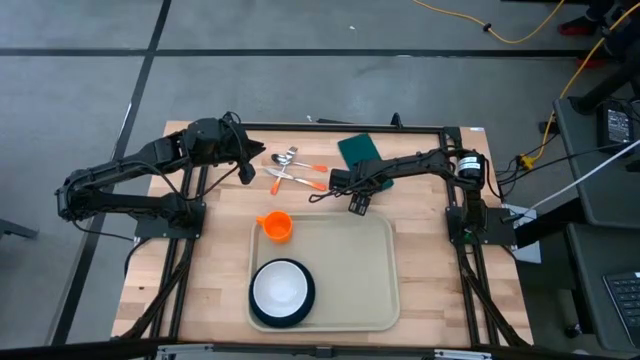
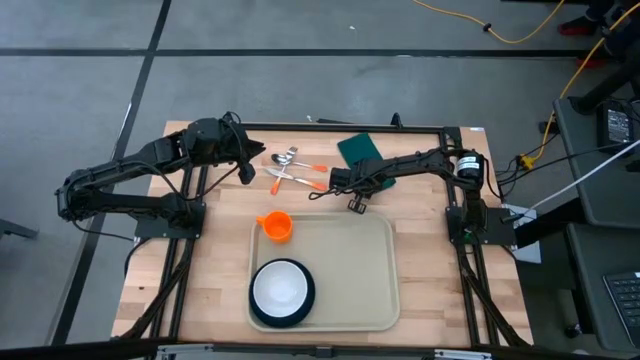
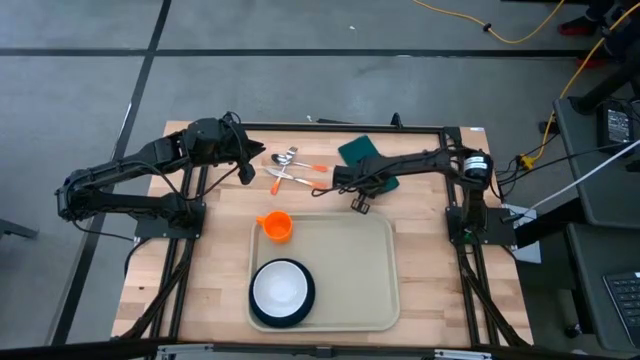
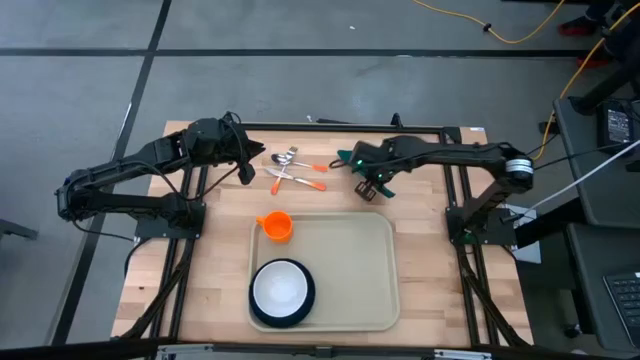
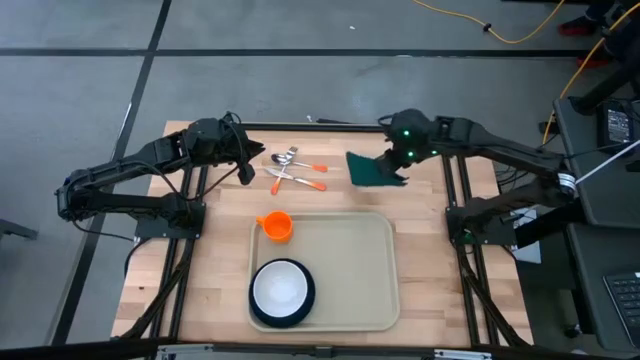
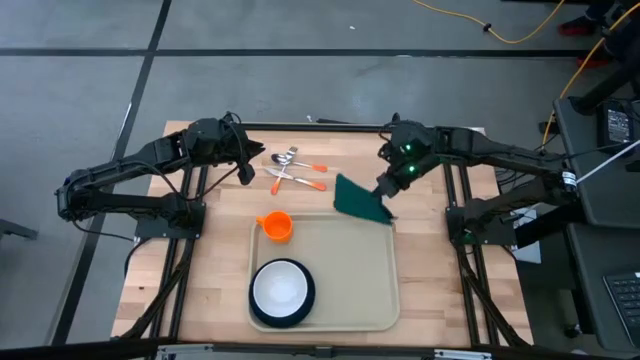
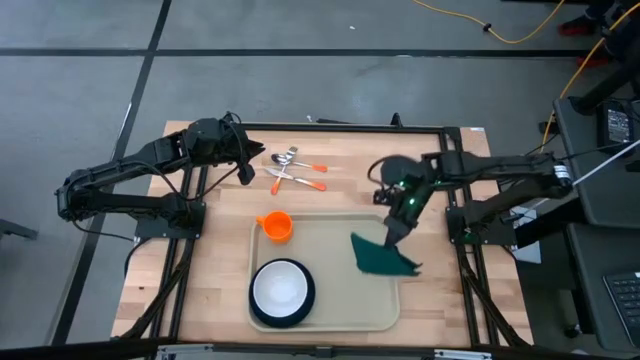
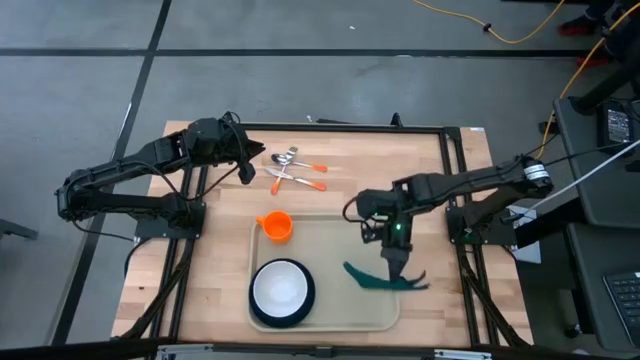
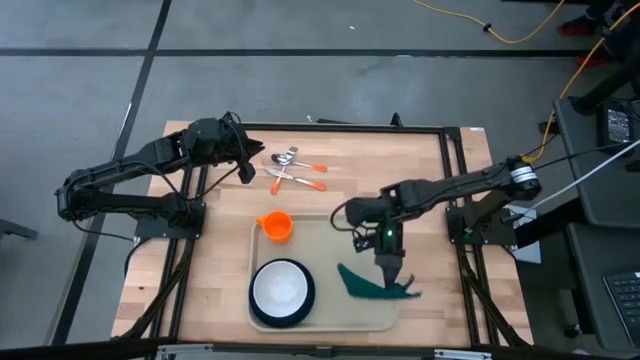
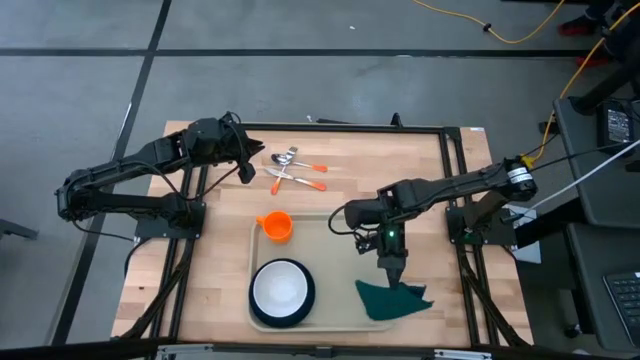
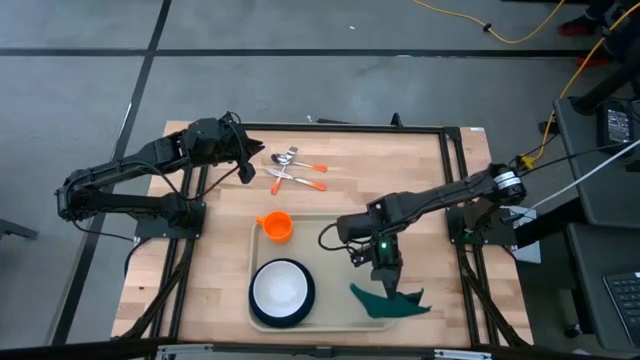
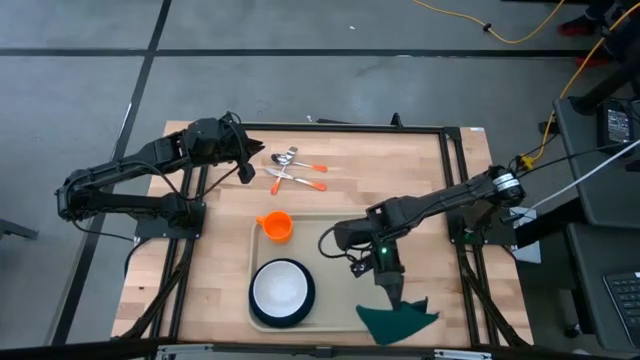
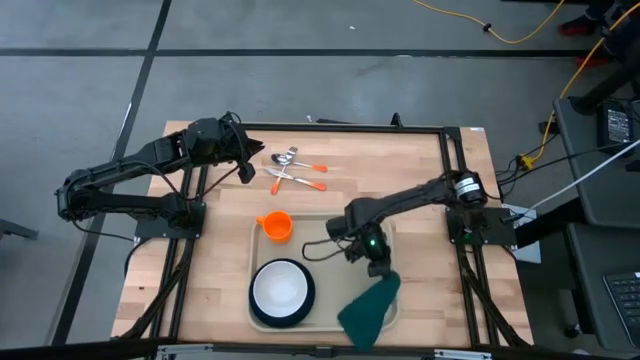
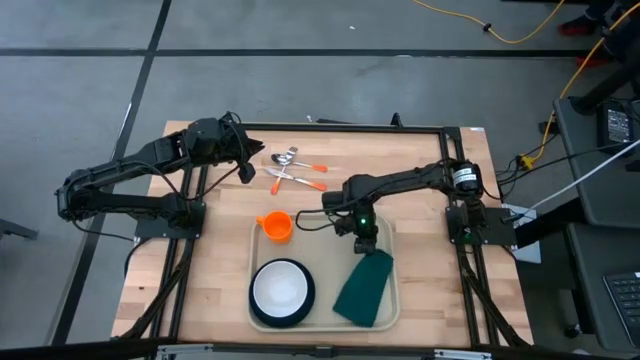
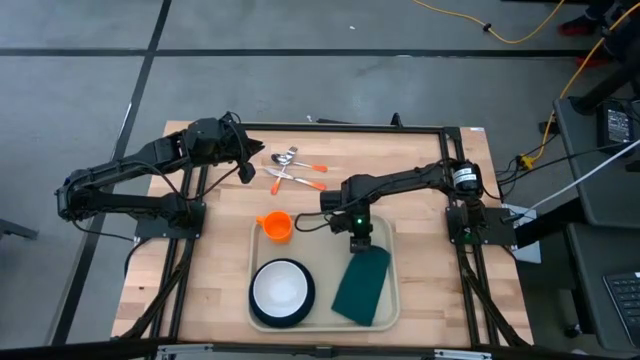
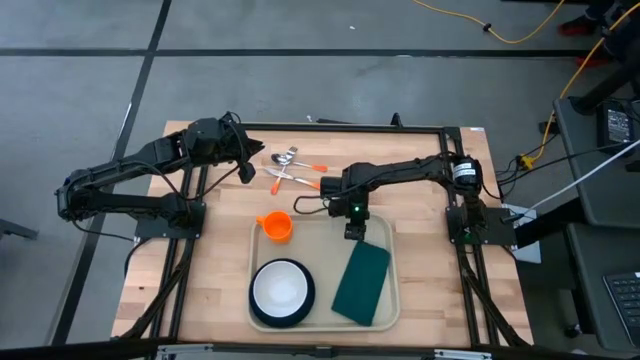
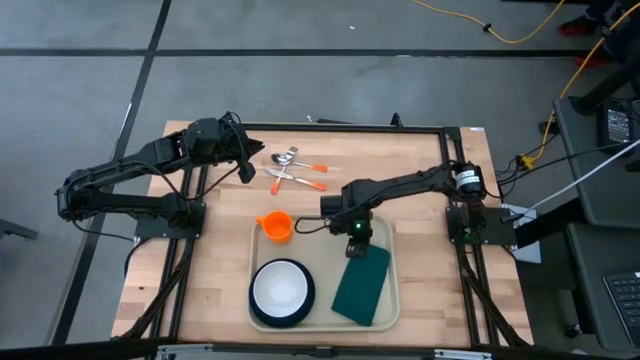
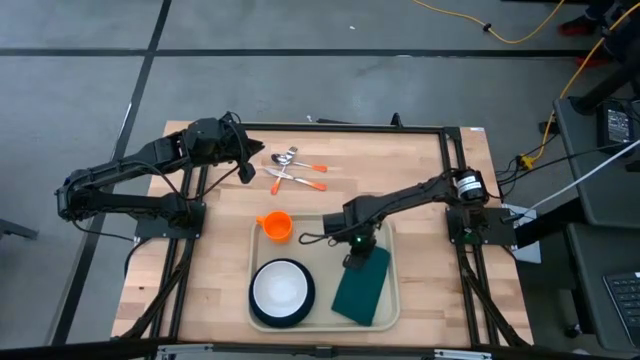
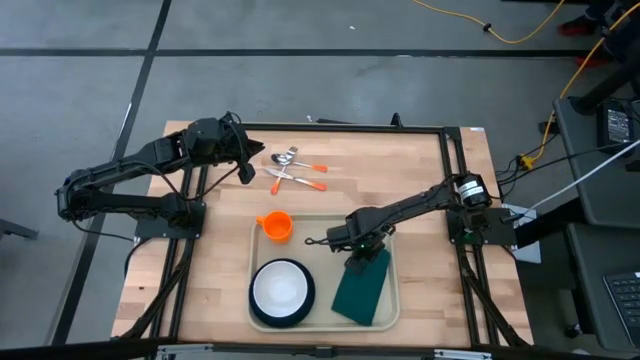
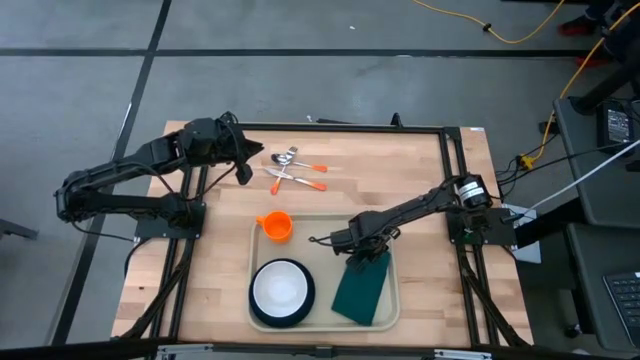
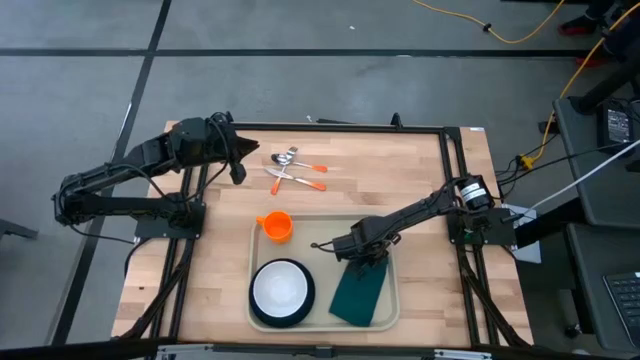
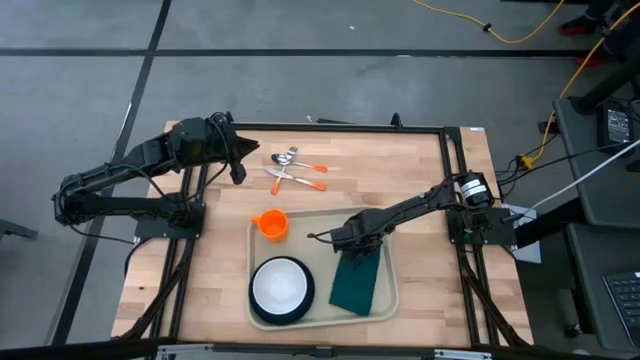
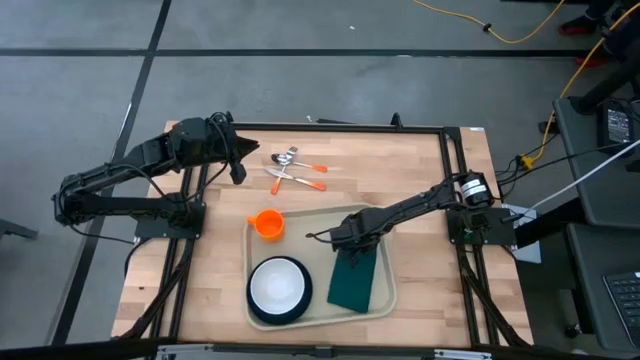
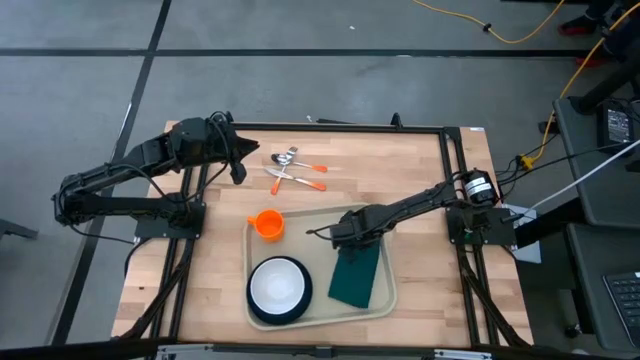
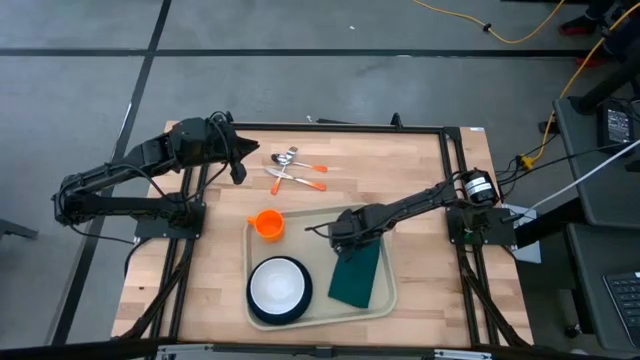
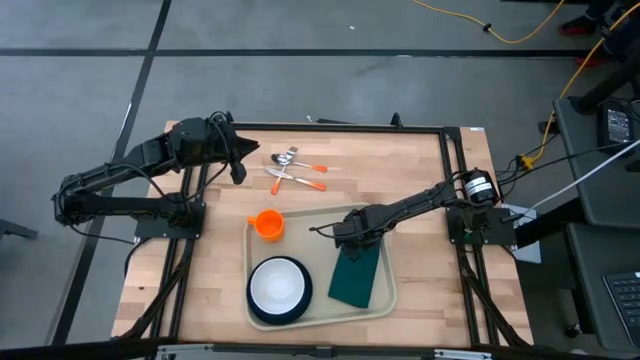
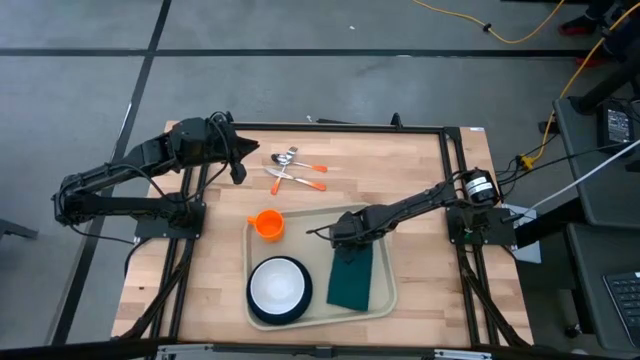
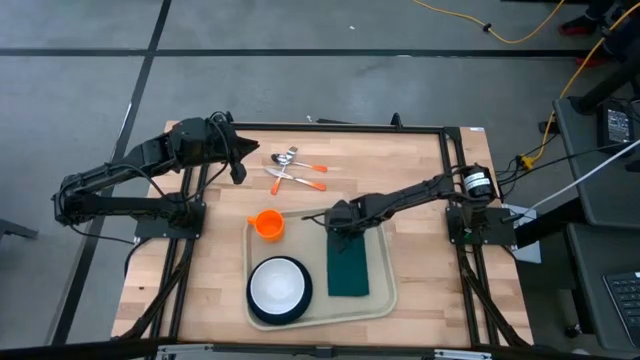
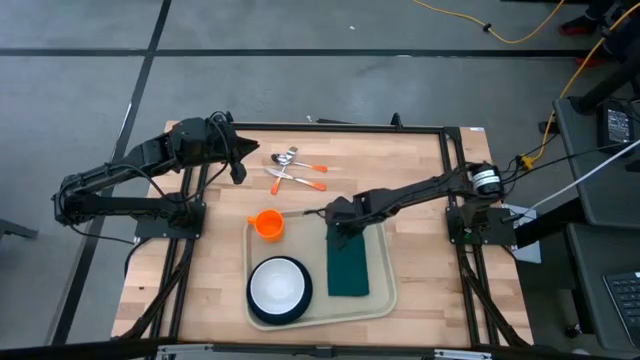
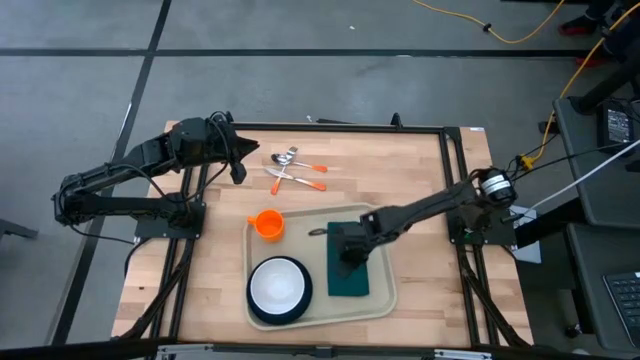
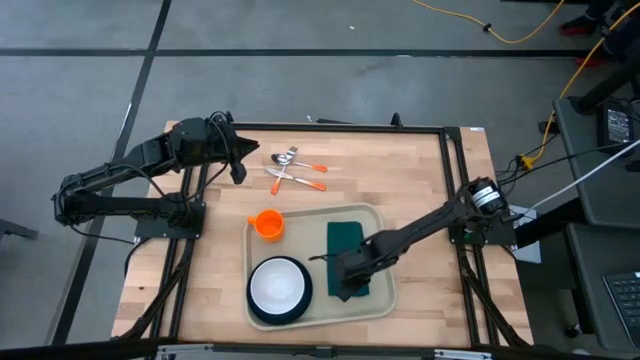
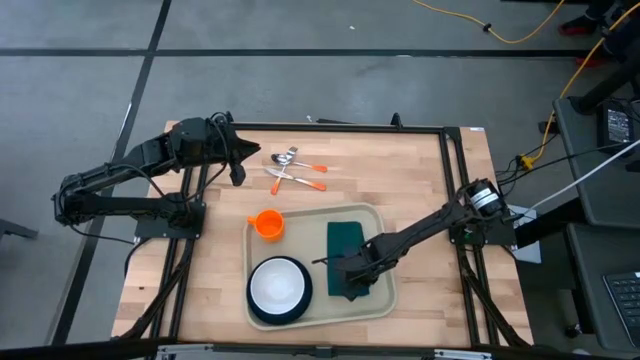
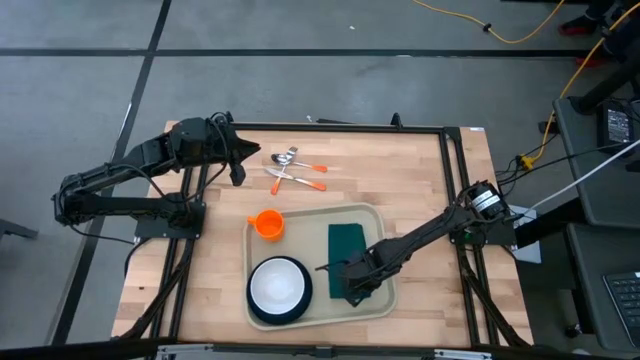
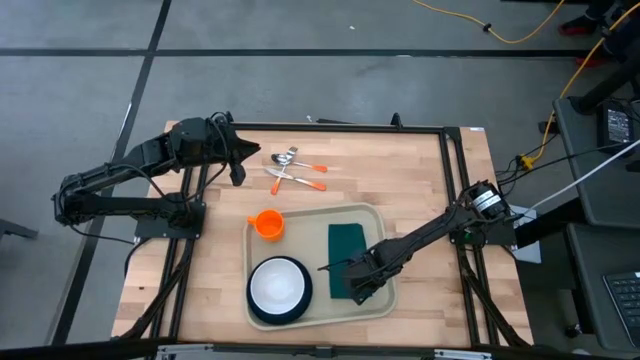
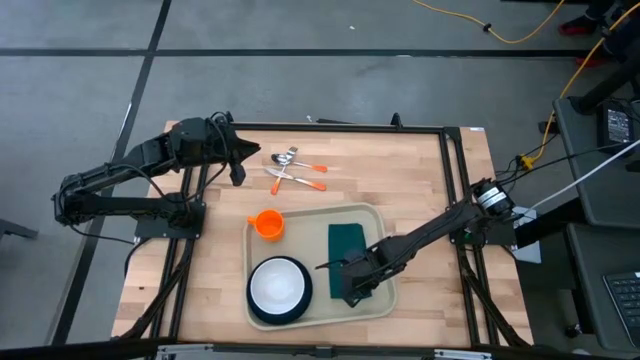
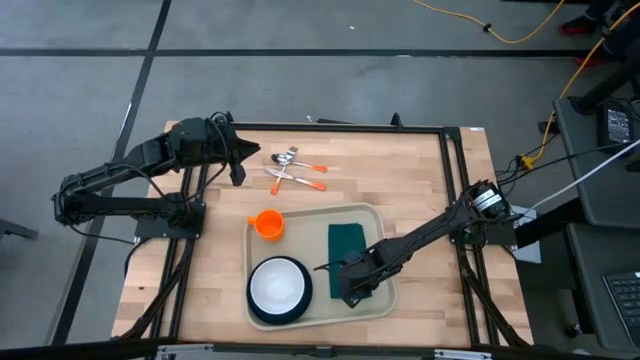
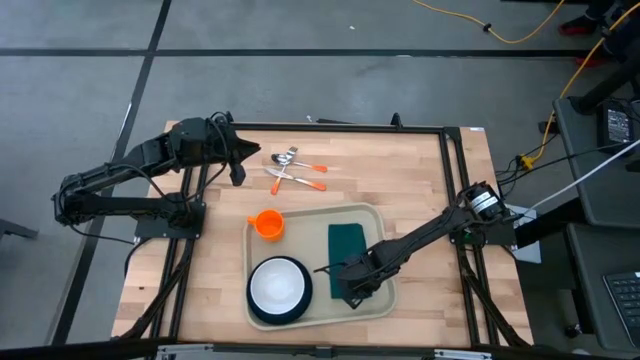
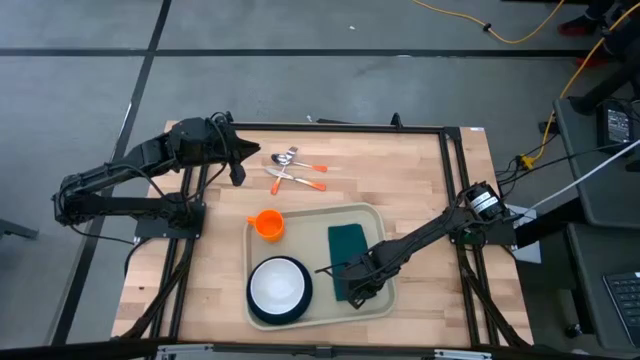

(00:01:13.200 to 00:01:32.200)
Task: Set up tray
Put the dark blue napkin to the right of the black plate on the gray serving tray

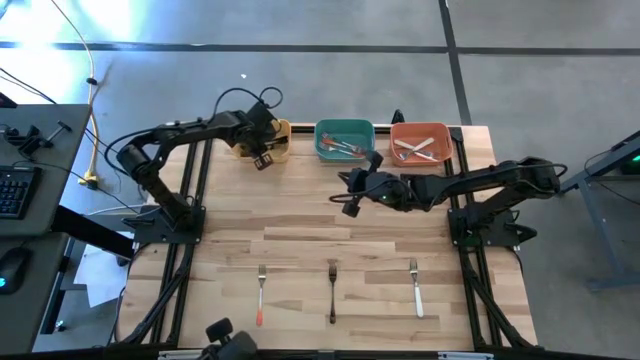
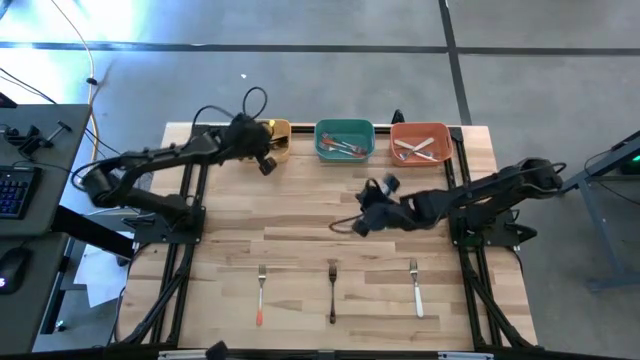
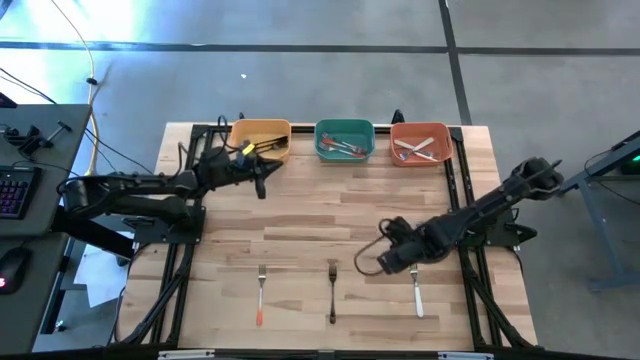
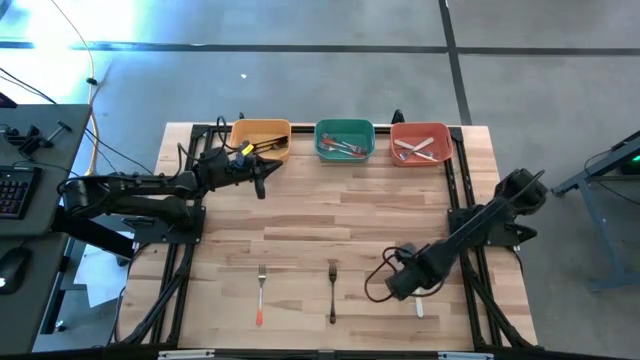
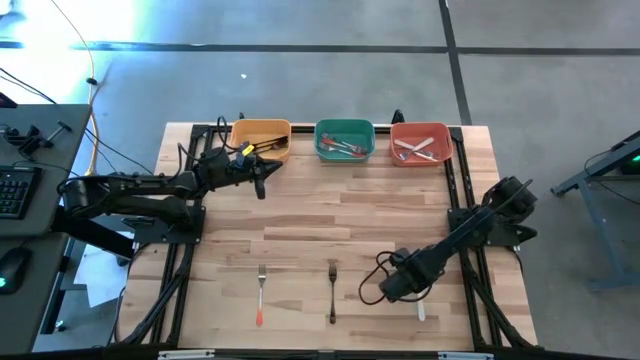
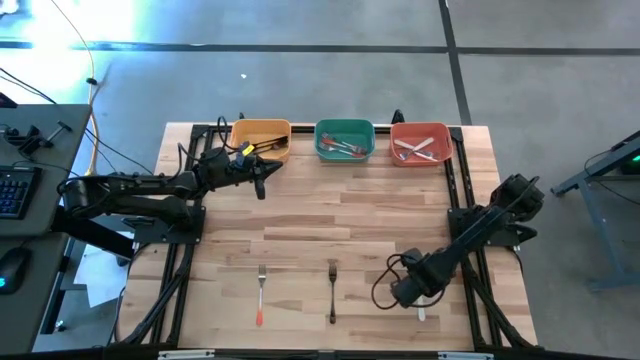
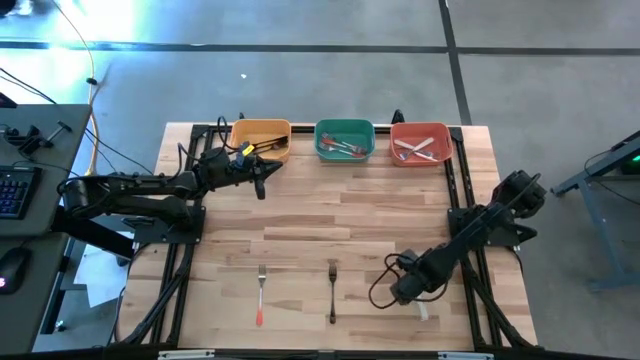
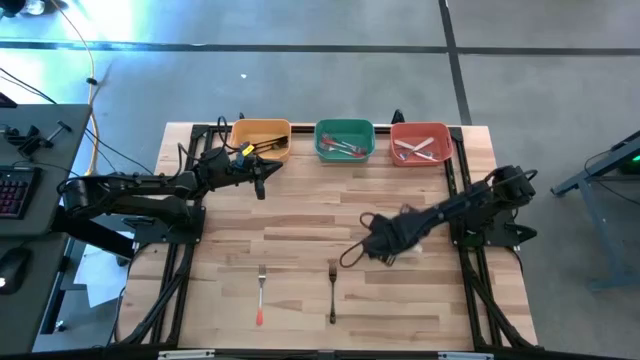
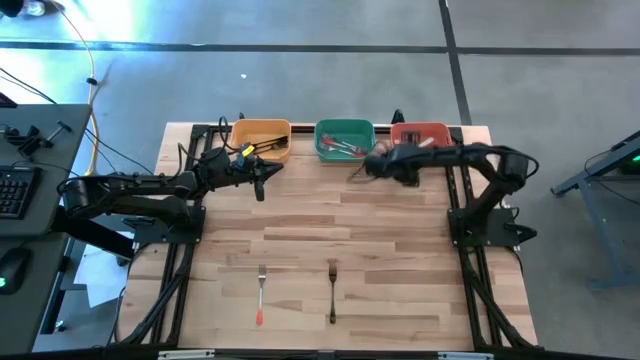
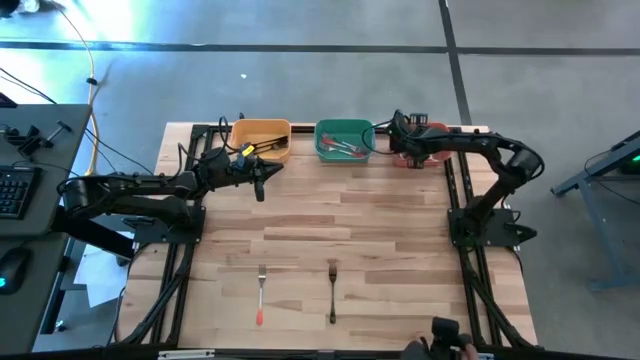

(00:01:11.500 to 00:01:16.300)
Task: Sort silverware by color (type)
Put the white fork into the orange bin
